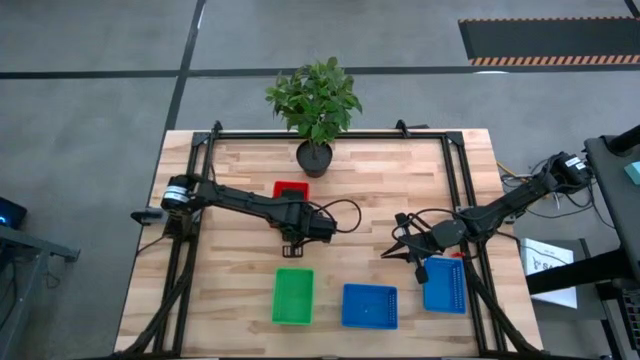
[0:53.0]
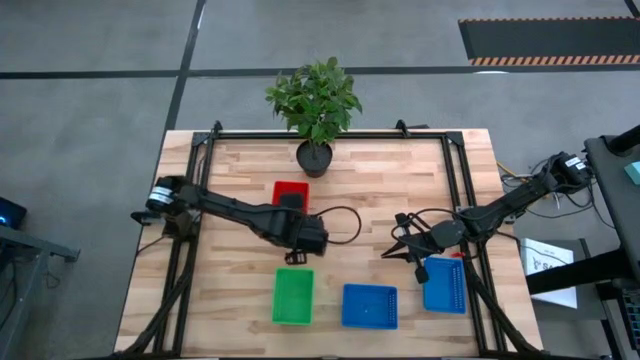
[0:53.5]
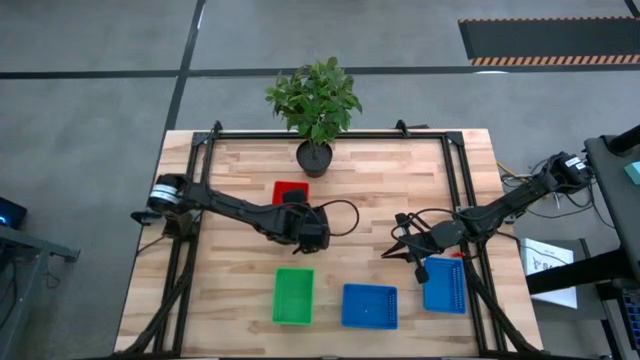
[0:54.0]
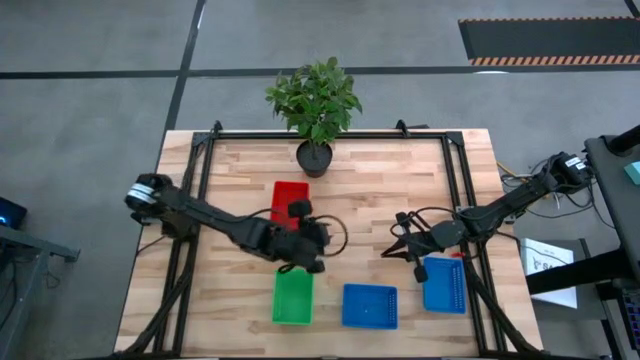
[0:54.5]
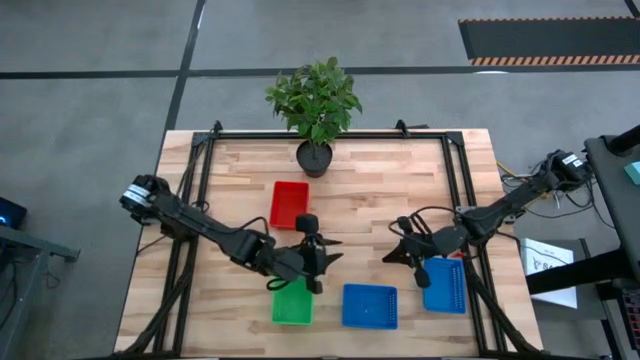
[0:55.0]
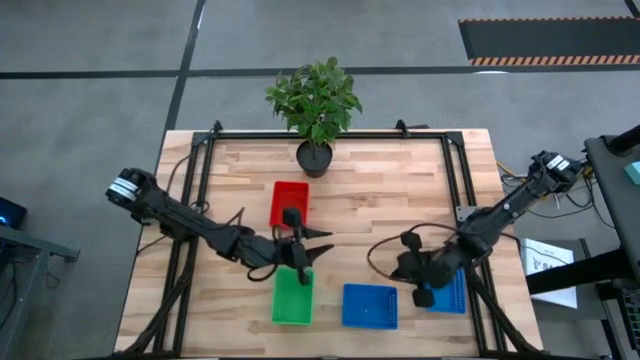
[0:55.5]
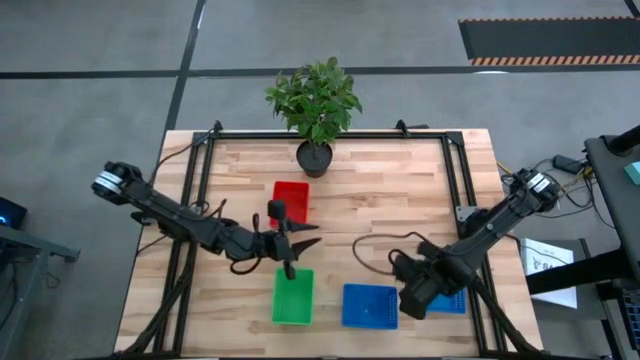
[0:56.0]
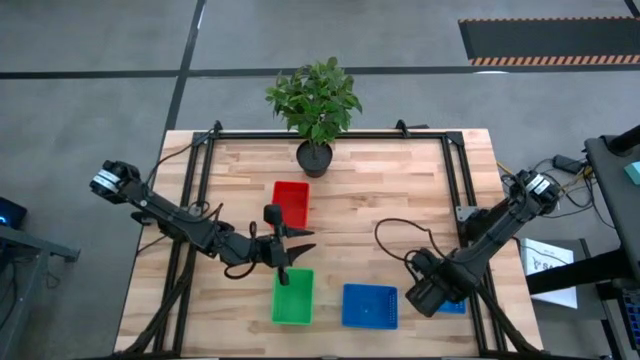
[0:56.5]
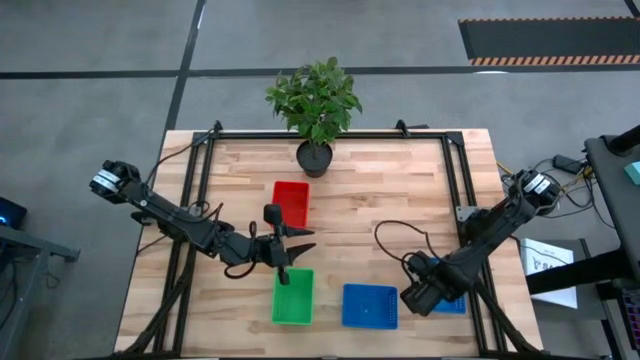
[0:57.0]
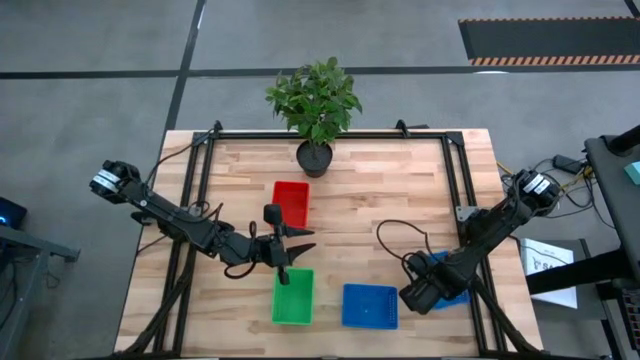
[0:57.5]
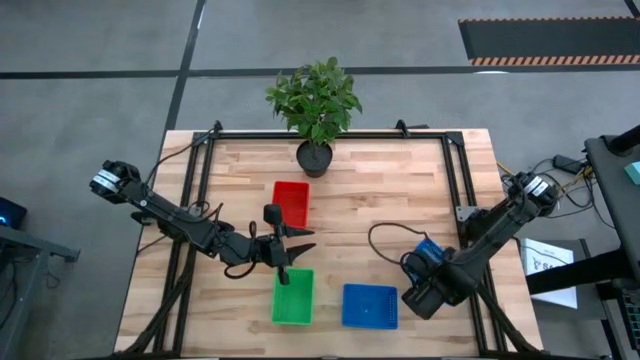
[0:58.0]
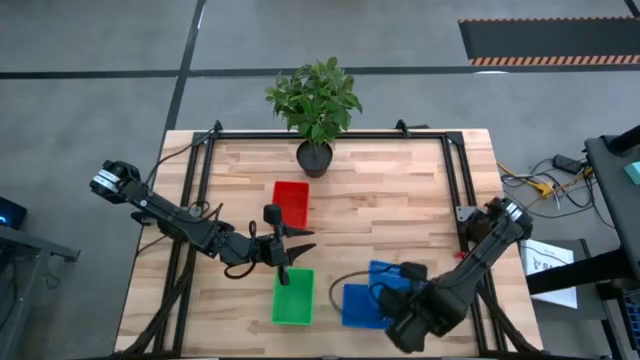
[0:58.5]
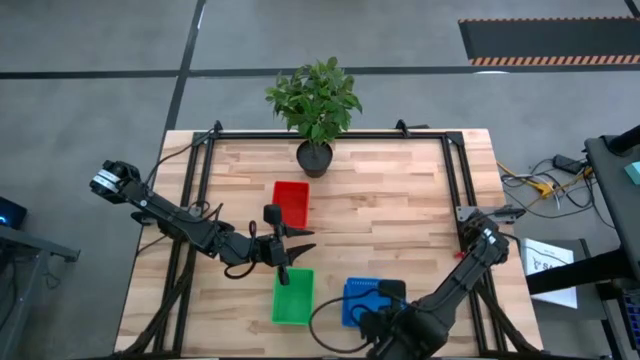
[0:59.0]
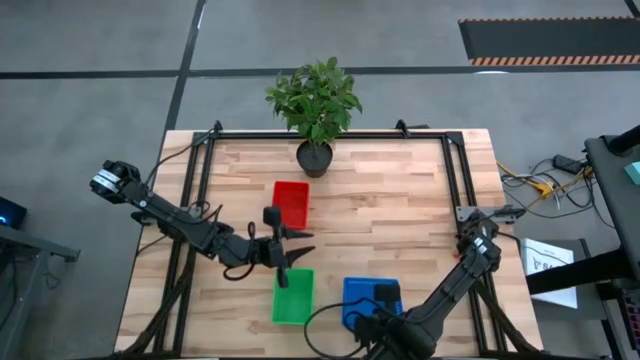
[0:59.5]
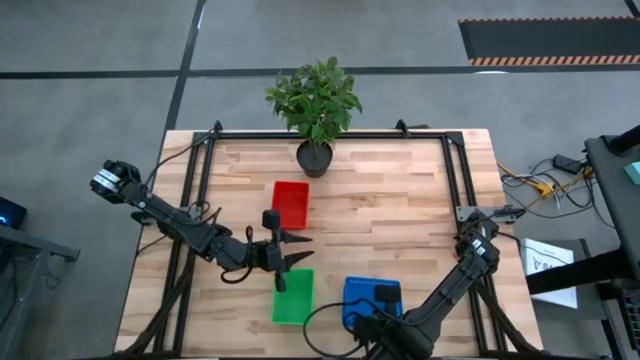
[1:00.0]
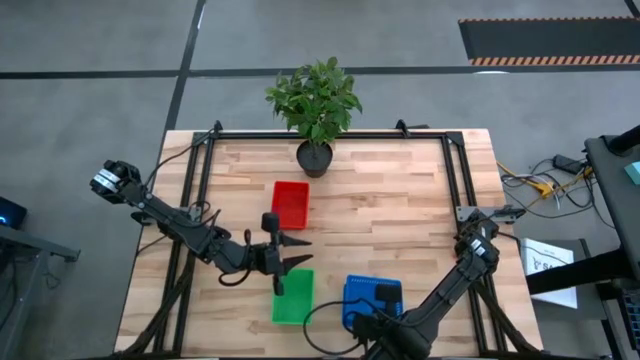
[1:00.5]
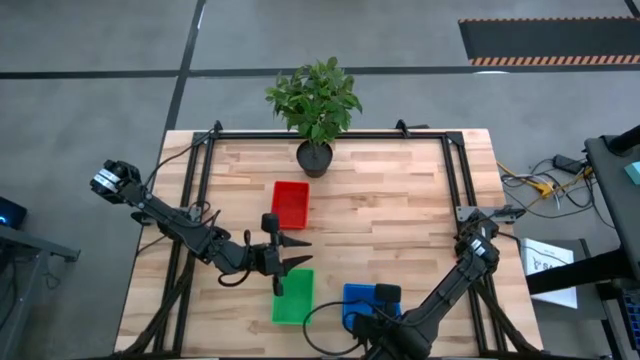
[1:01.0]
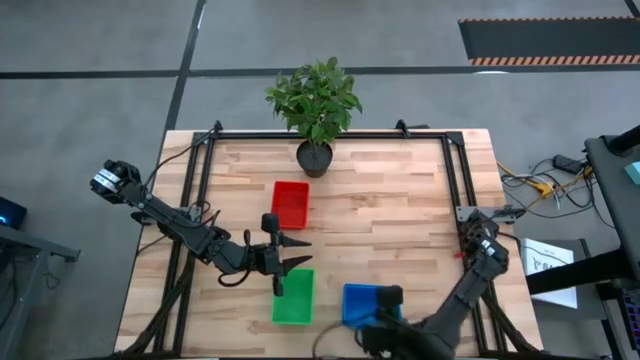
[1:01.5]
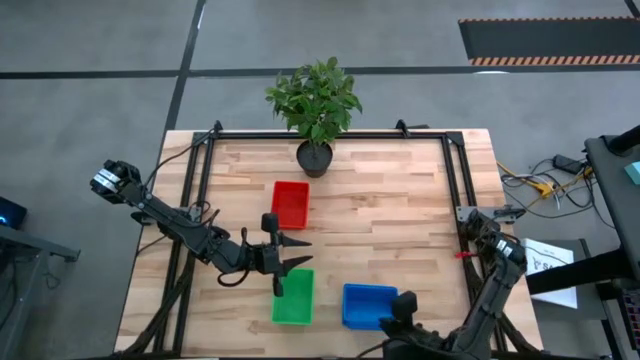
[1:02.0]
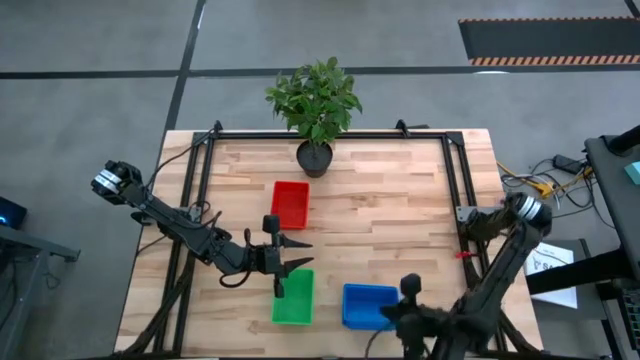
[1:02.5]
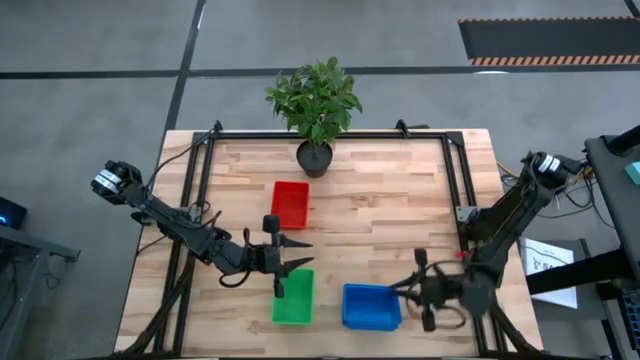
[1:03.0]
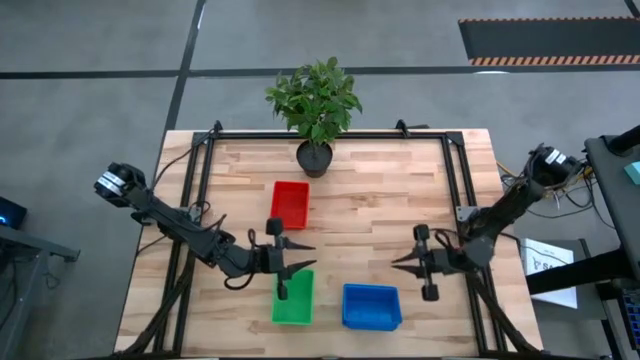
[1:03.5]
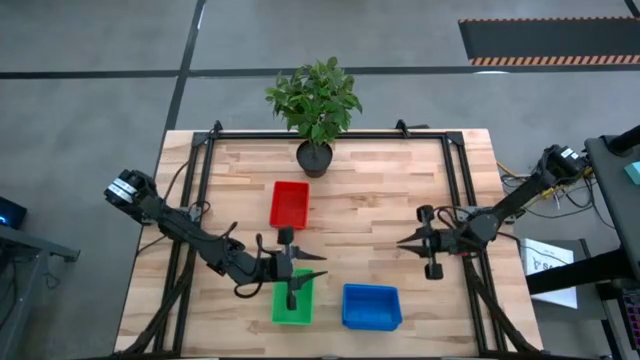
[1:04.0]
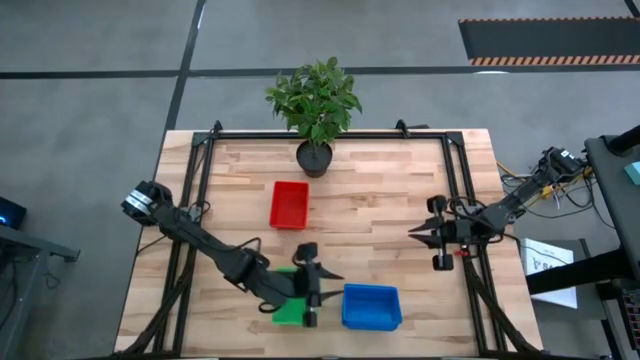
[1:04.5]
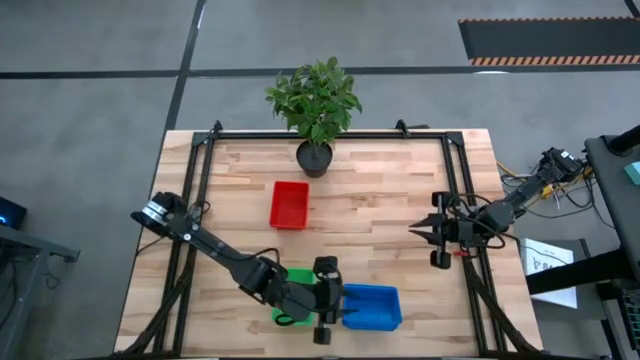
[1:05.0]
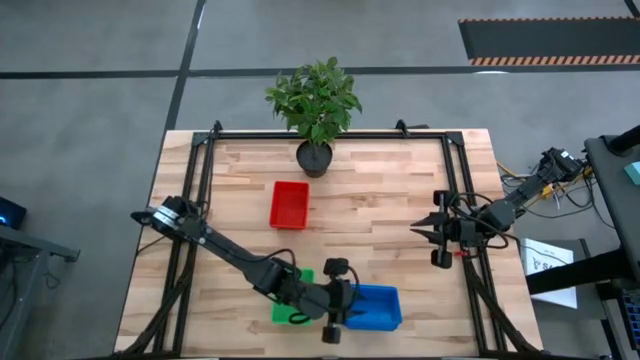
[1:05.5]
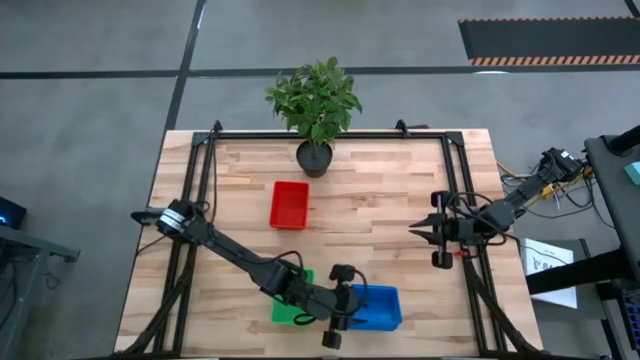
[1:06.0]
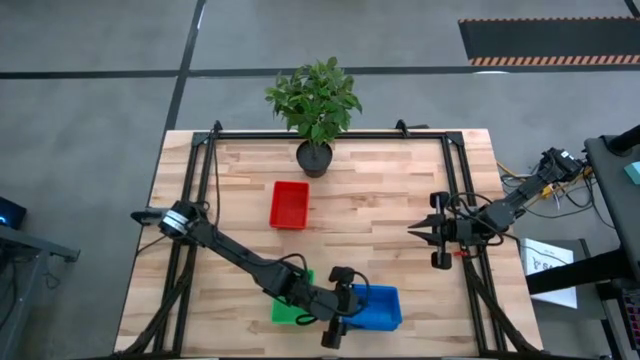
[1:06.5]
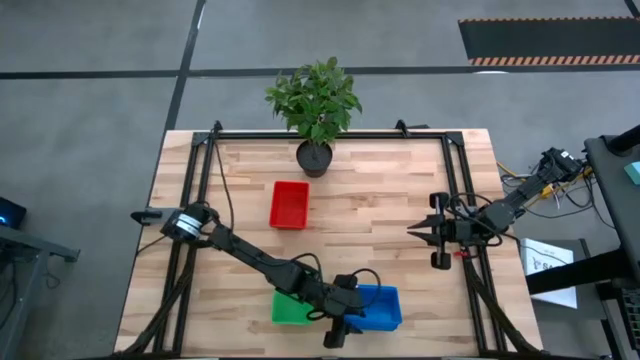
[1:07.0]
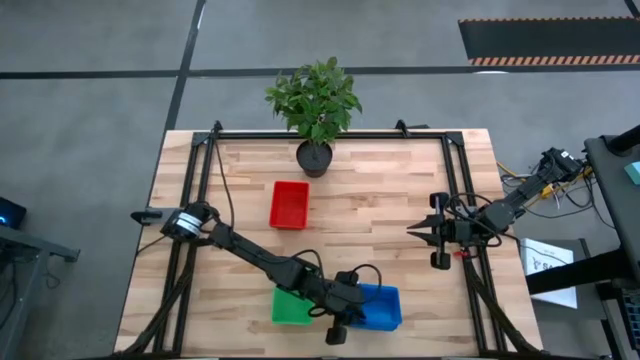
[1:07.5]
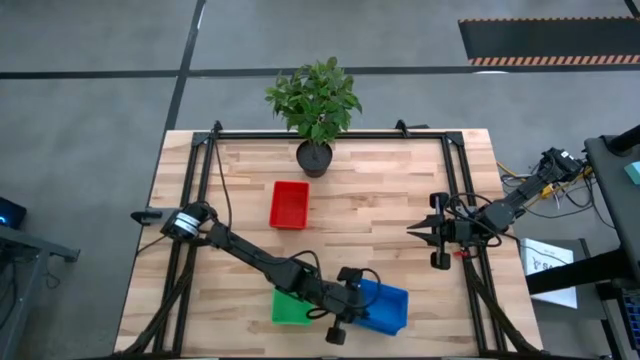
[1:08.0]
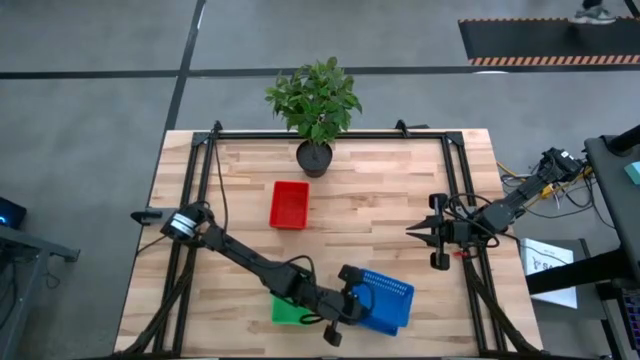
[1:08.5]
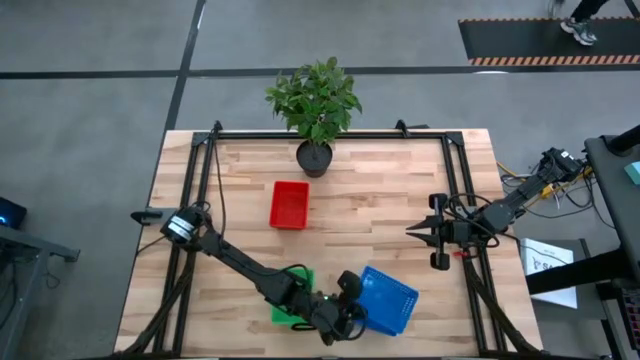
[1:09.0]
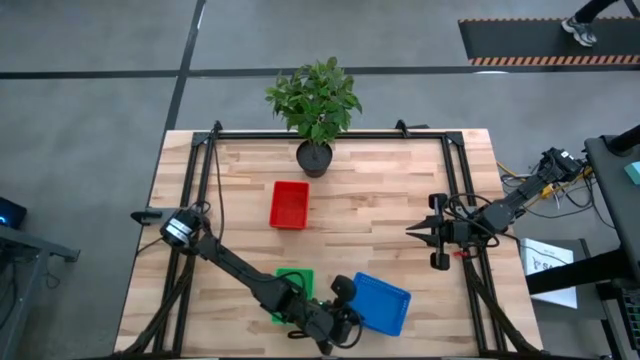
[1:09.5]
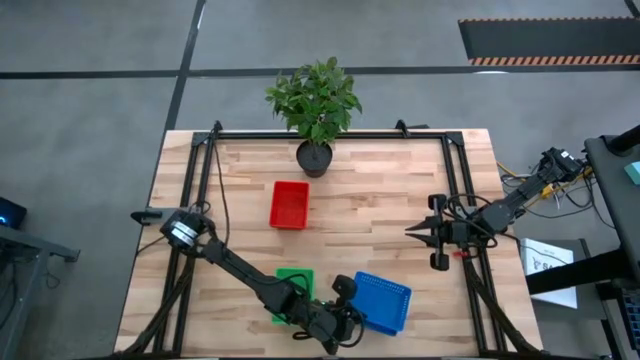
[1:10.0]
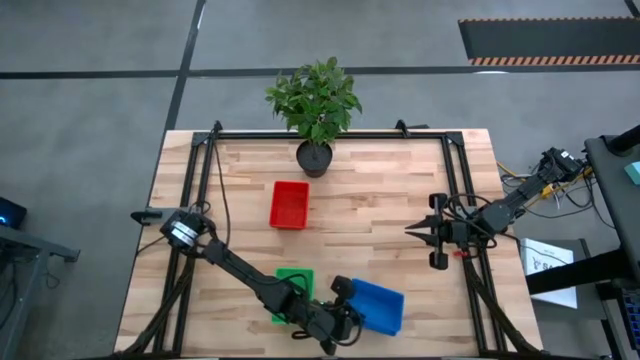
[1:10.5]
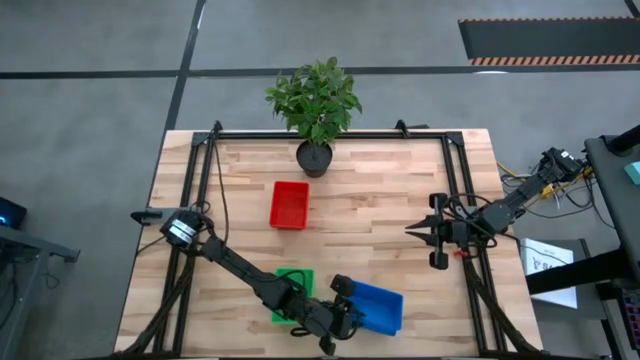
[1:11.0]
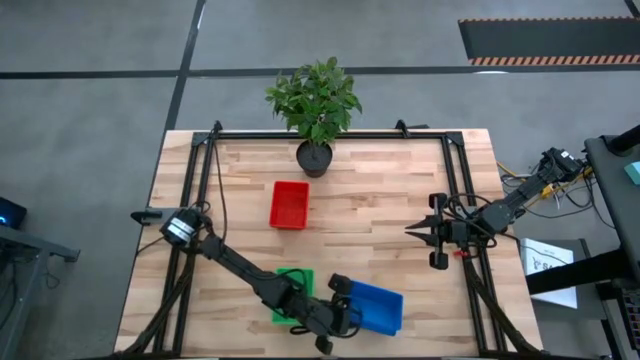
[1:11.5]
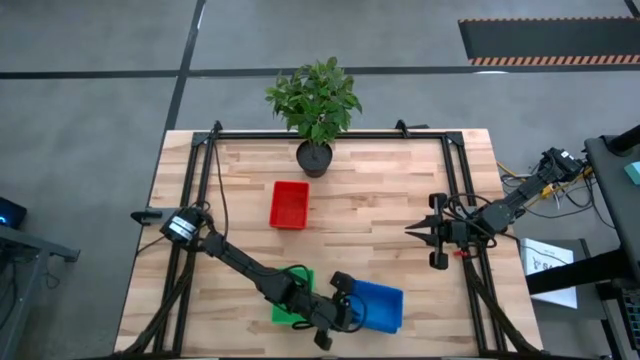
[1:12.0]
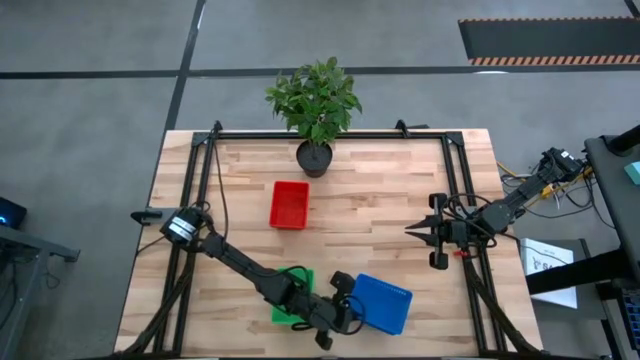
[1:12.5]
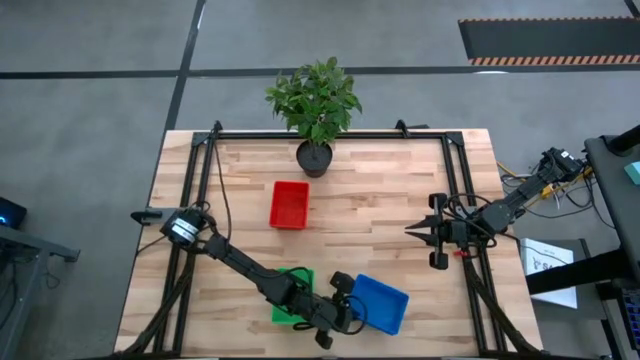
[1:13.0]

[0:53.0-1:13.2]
Stack the right blue basket on top of the left blue baskets
